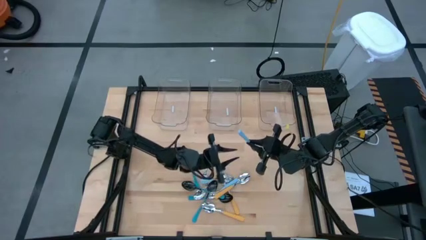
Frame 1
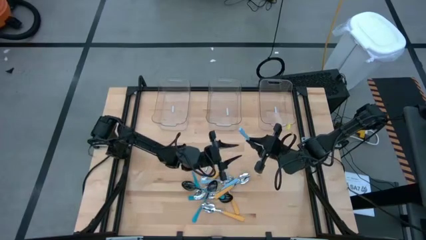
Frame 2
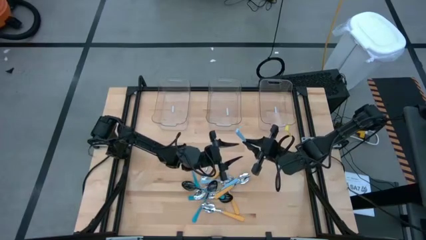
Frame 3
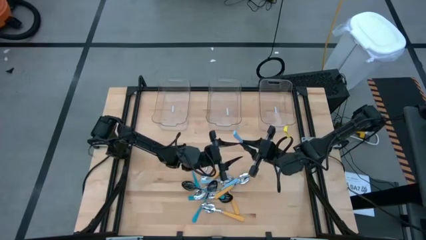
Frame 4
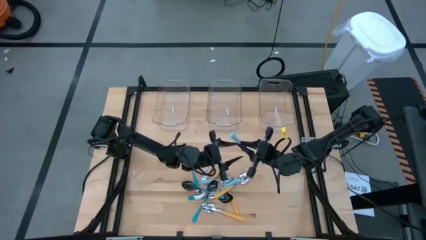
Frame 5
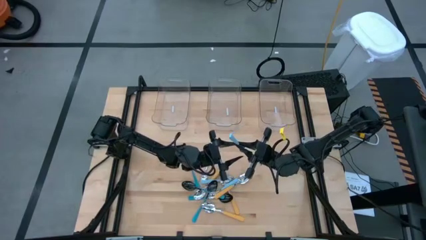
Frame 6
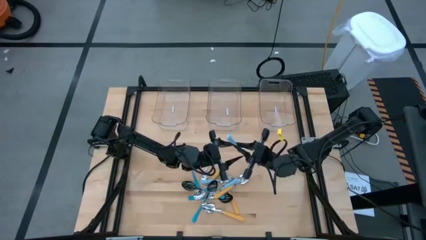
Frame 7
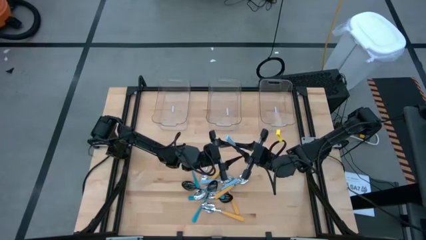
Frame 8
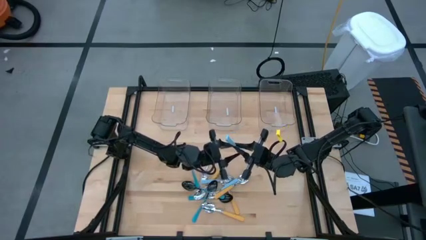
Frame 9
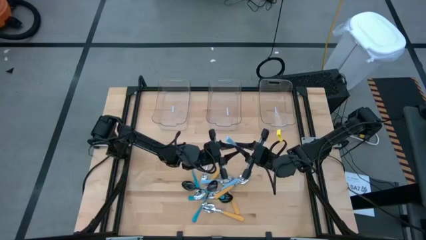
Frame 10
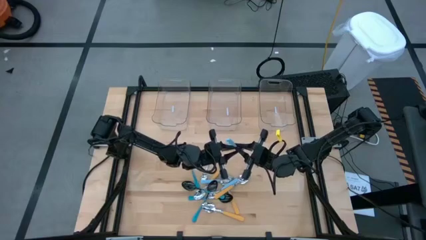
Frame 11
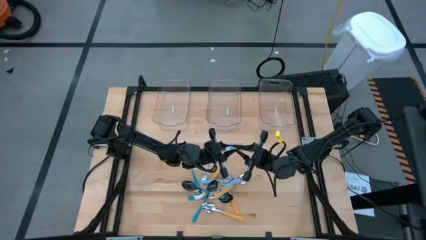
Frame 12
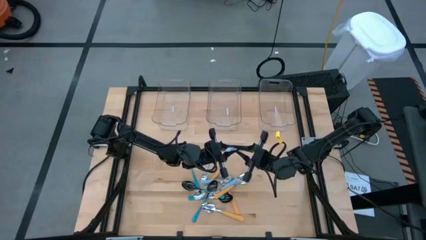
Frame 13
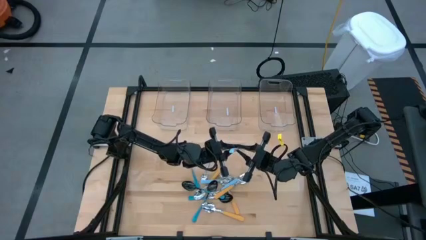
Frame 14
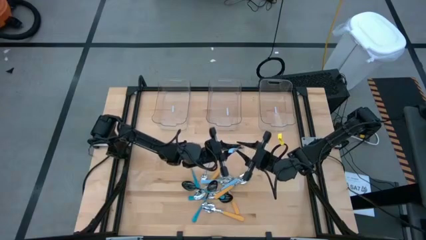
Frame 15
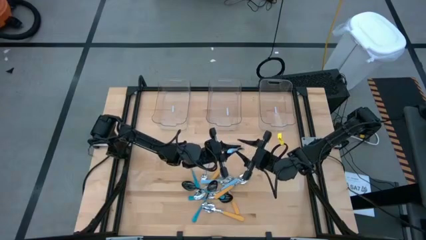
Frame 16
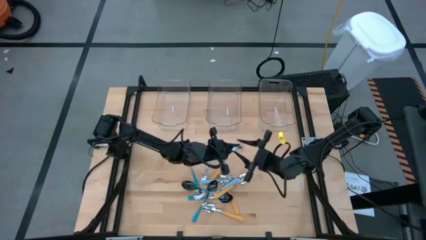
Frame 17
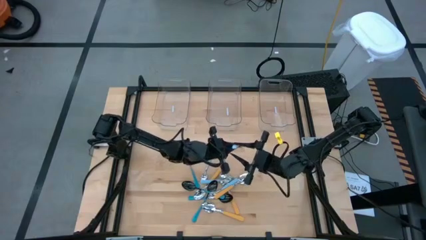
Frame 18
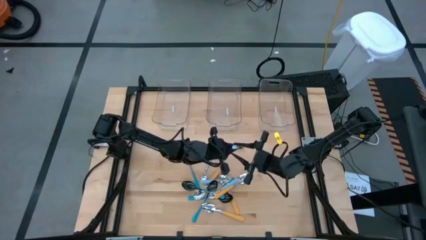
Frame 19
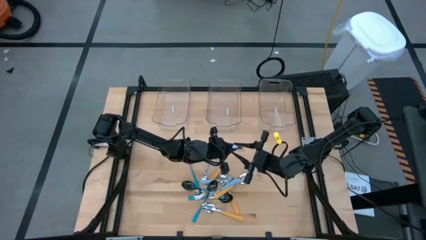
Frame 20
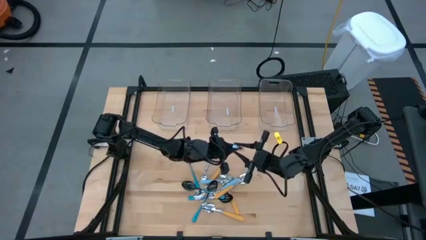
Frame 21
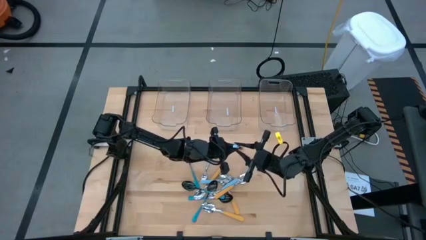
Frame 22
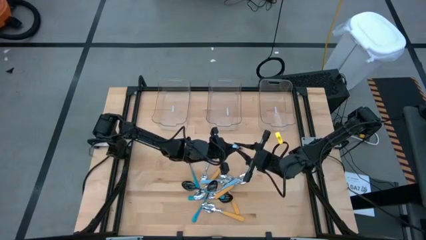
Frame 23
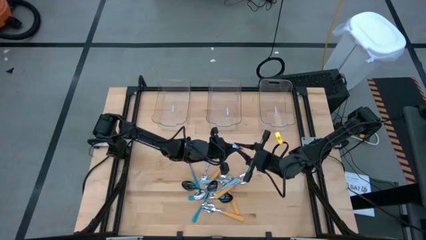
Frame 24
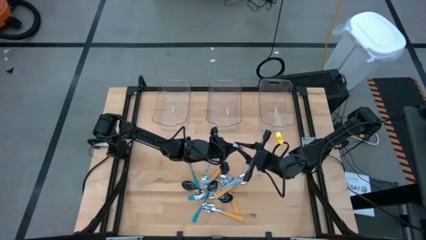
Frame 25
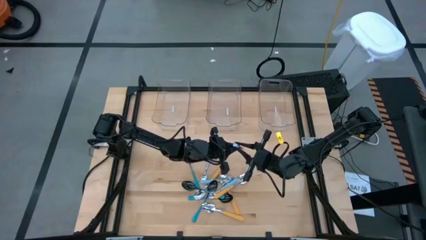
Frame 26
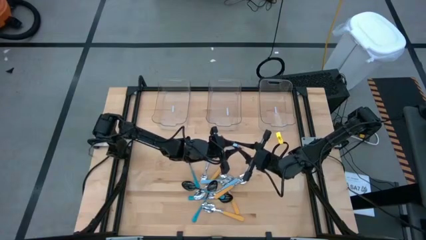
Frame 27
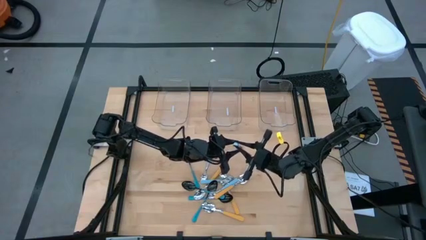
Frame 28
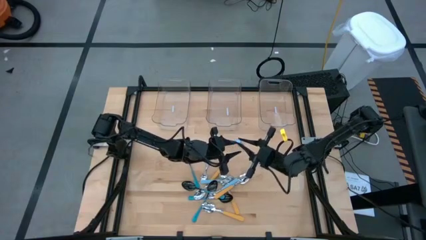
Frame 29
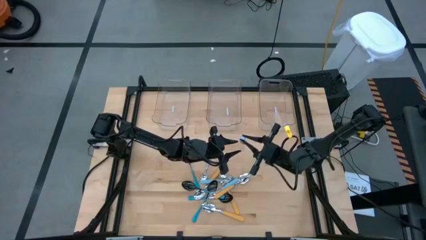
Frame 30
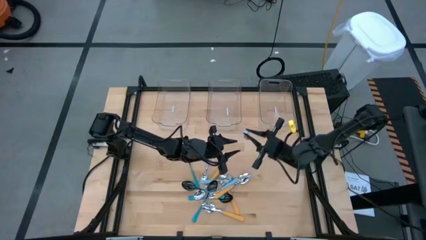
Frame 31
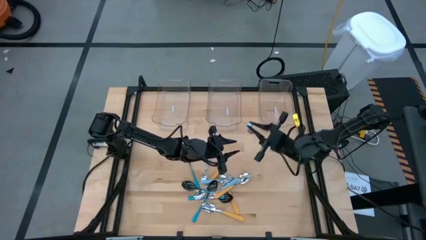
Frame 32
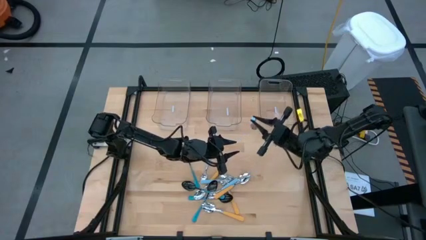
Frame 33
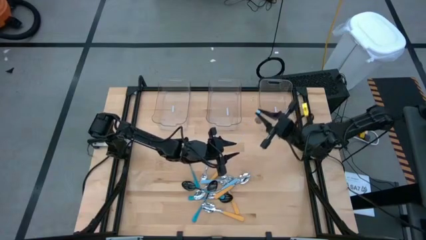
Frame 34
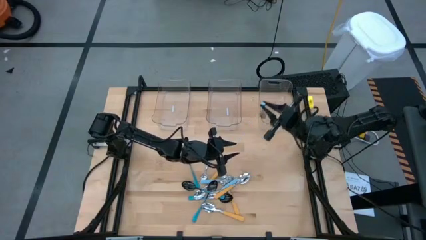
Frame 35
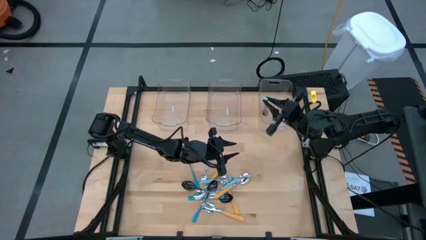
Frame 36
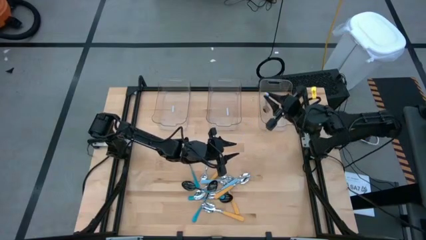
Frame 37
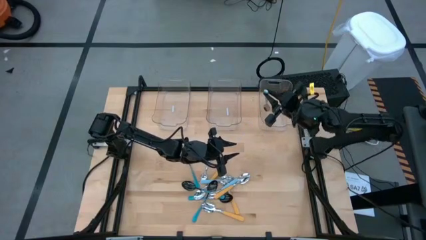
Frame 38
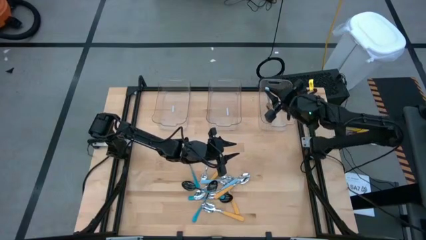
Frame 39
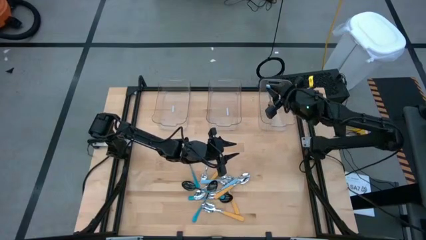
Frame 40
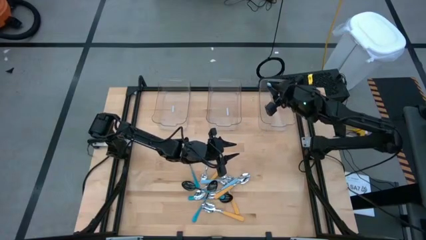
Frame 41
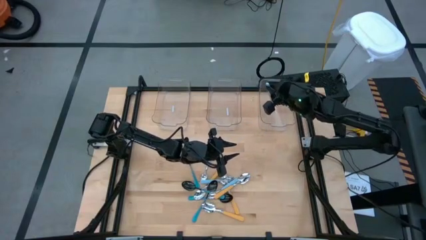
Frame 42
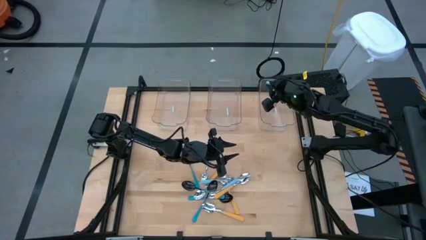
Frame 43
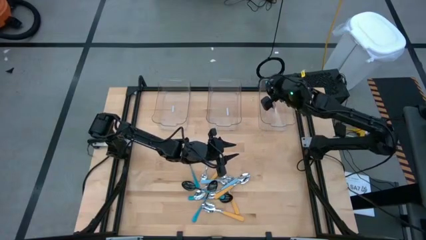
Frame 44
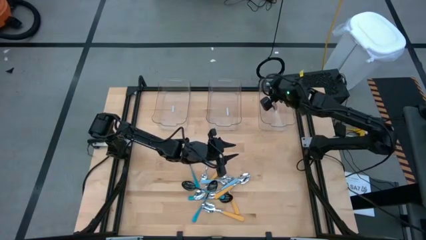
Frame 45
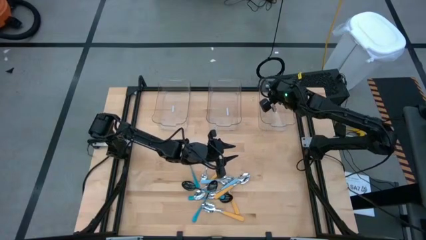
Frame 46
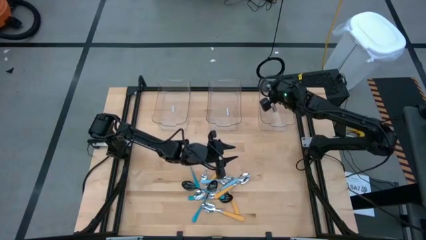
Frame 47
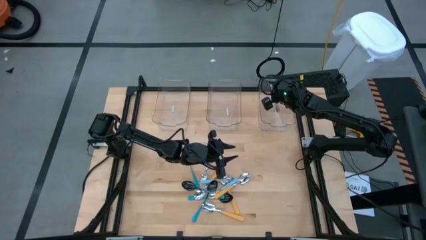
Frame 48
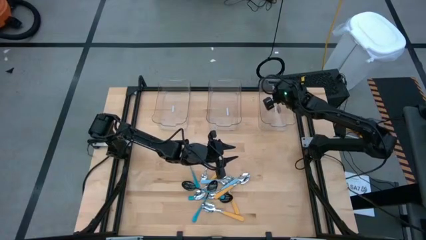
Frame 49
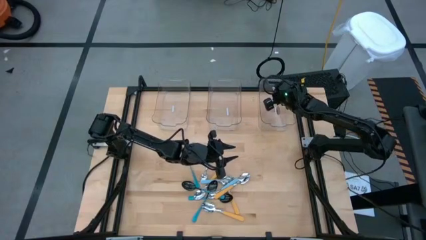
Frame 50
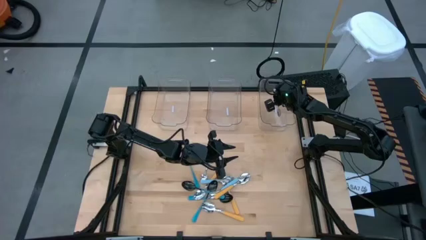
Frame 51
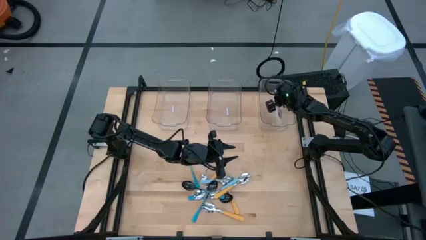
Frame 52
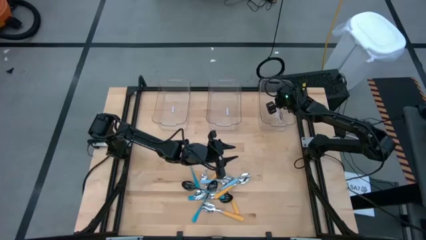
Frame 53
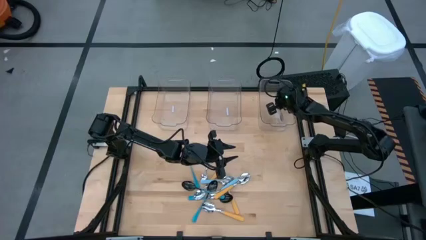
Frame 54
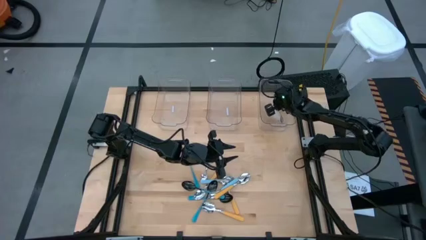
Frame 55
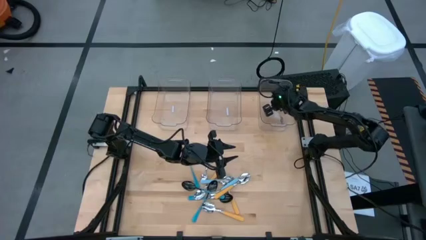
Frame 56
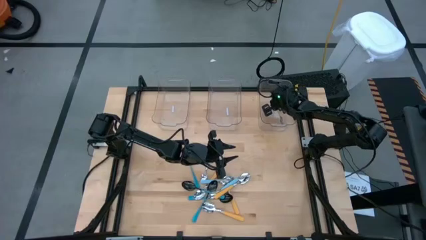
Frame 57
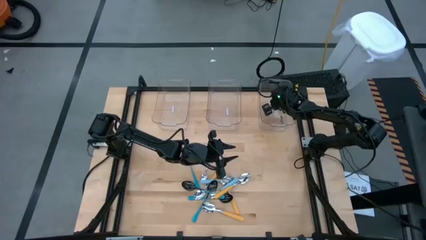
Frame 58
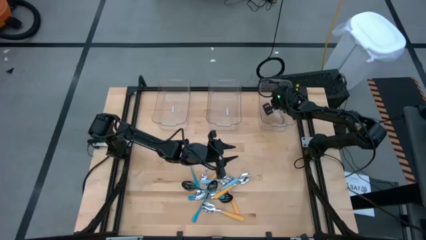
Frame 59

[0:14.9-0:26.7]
Task: Sort silverware by color (type)
Put the light blue spoon into the right transparent bin

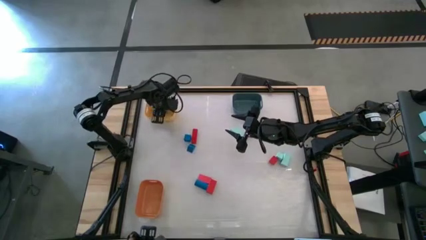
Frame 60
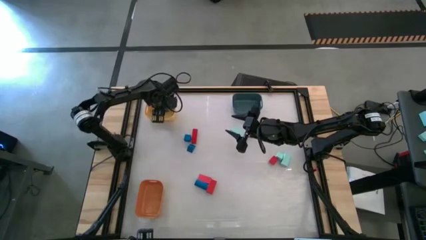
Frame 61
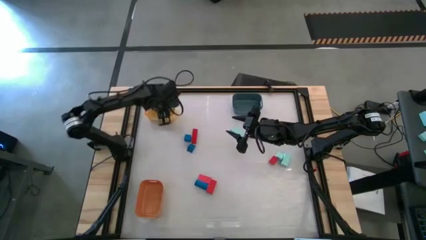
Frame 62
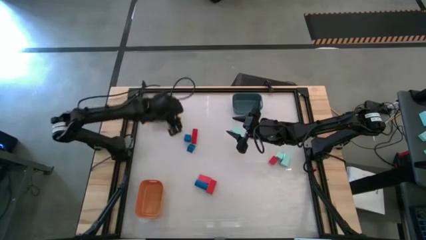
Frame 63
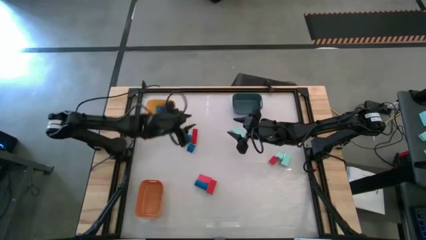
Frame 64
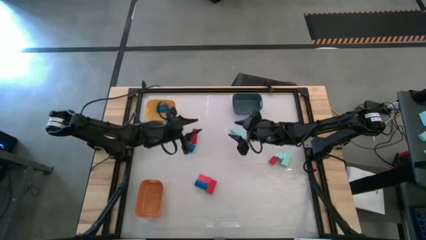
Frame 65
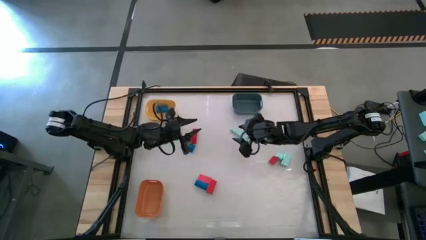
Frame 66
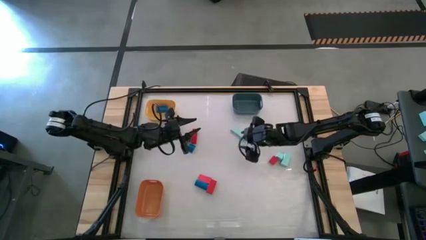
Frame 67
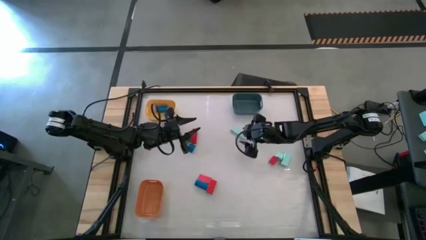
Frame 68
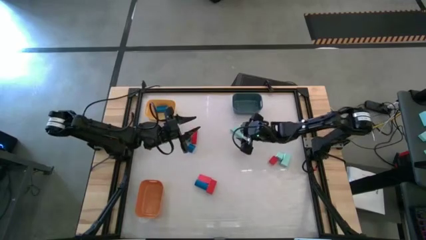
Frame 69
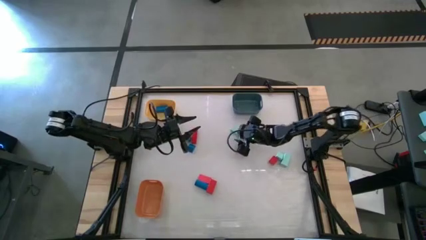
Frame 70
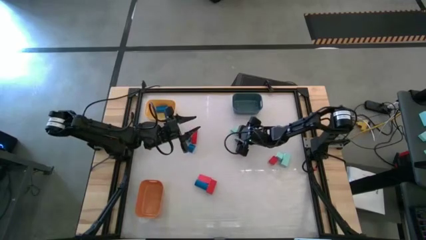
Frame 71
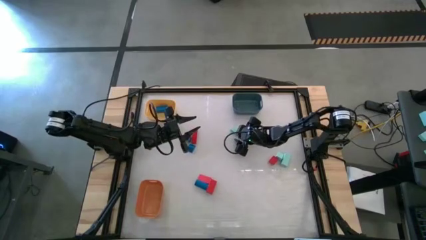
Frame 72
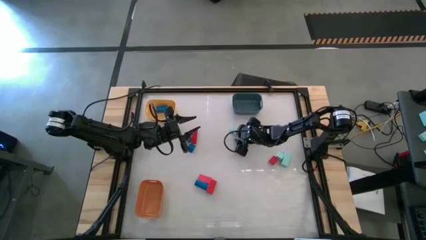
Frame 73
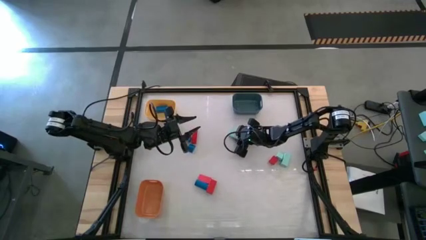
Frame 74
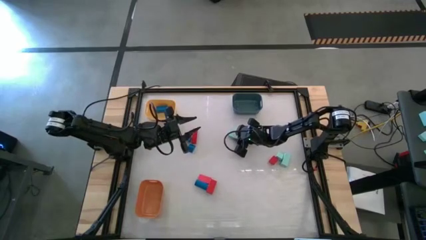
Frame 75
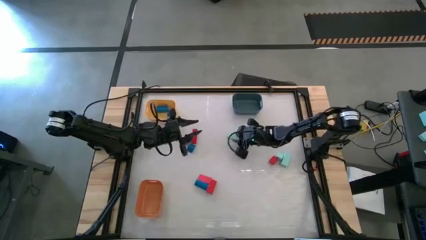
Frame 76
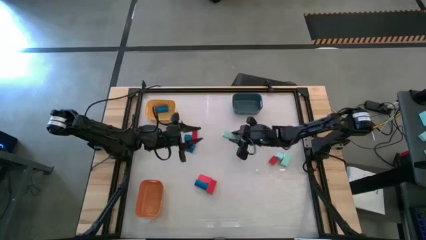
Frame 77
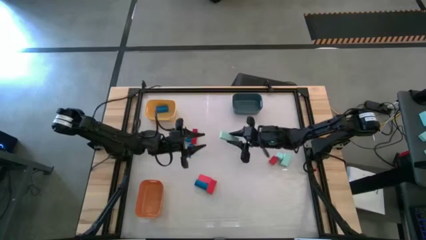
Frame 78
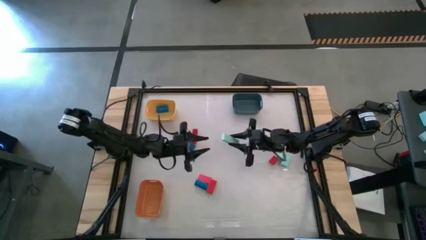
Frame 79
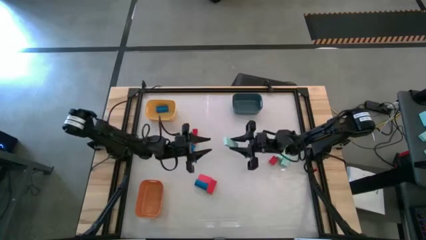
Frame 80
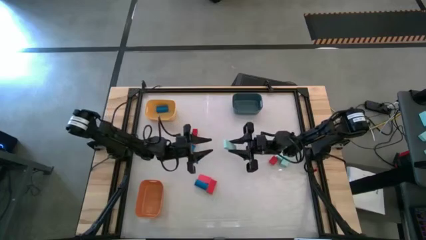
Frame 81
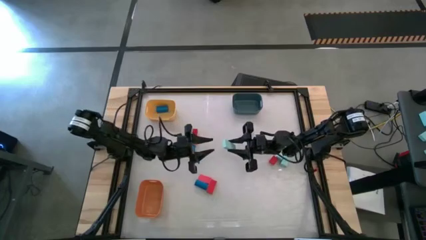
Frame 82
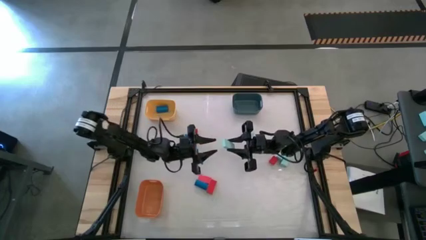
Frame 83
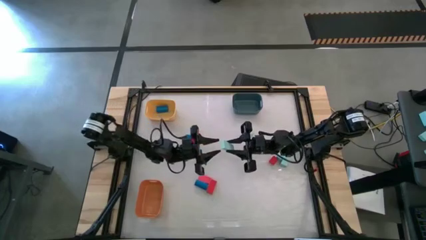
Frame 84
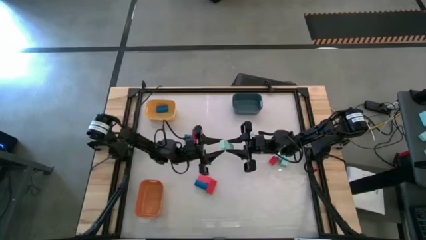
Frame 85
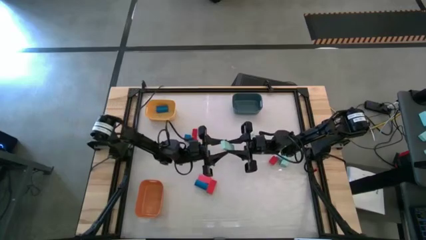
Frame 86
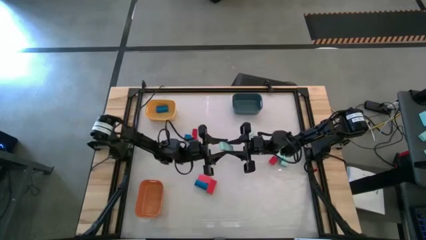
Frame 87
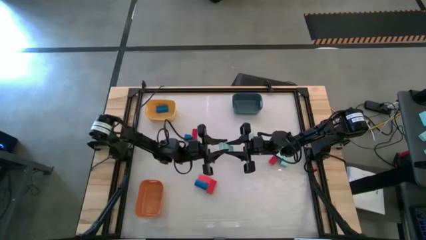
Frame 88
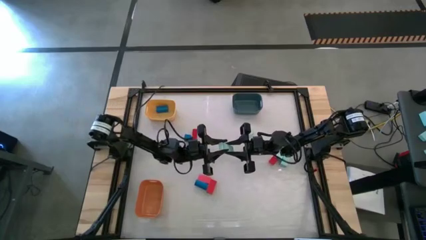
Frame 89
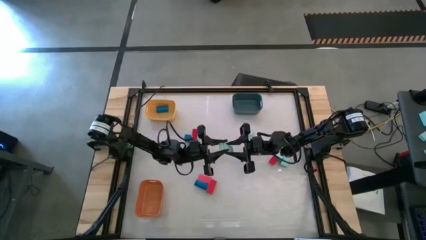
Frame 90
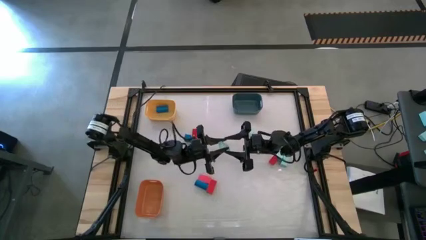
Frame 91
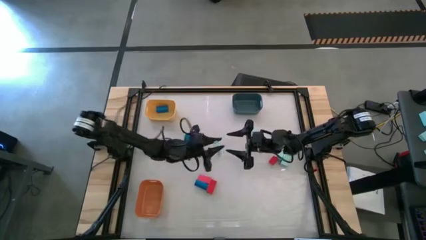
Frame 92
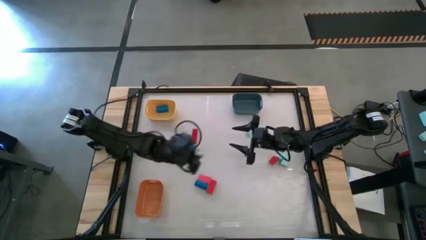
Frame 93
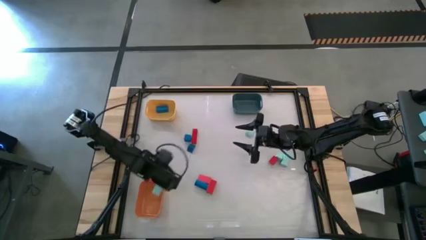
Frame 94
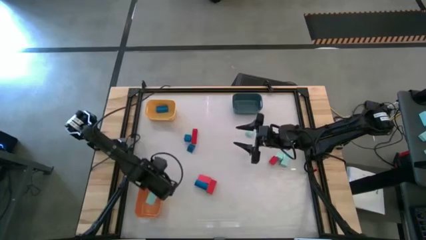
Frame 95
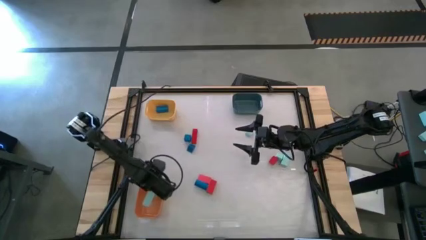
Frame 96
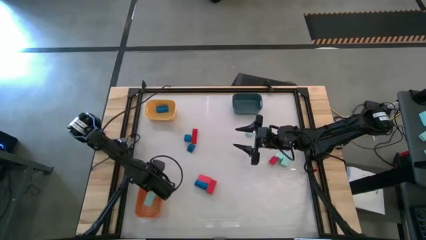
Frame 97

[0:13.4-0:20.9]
Task: Sort & place blocks by color
Put the top left light blue block into the orange bin
